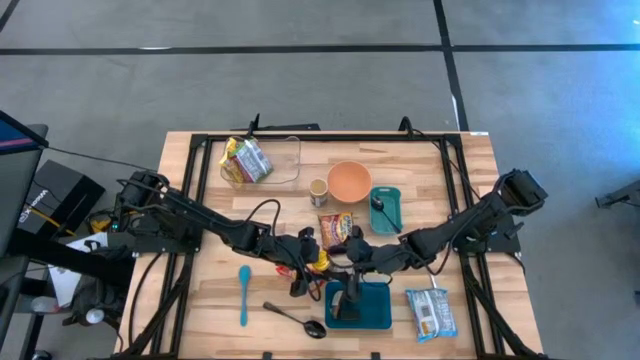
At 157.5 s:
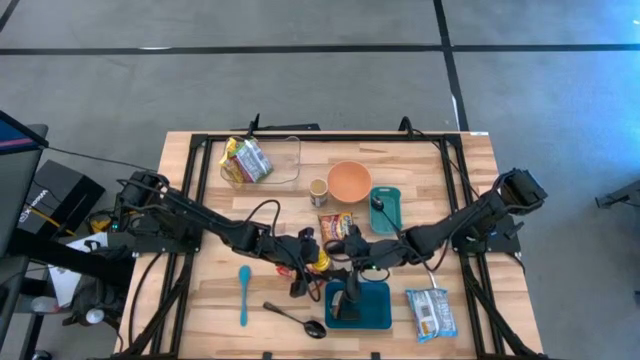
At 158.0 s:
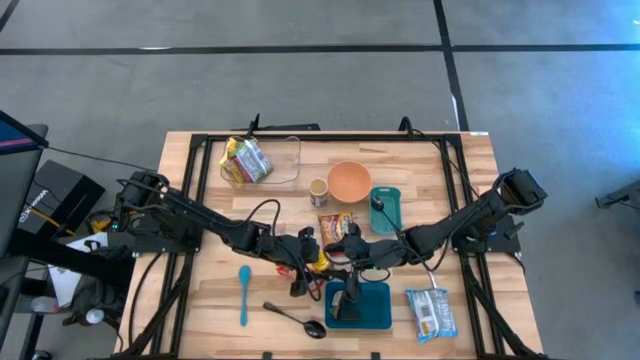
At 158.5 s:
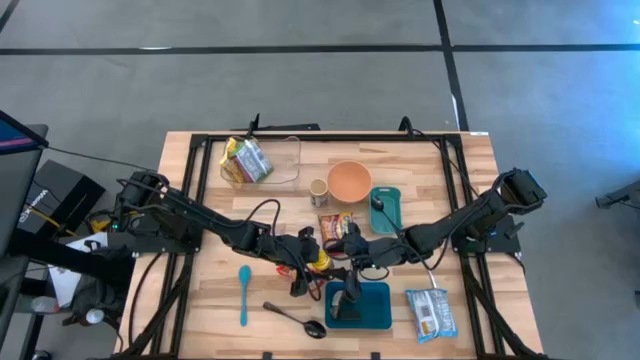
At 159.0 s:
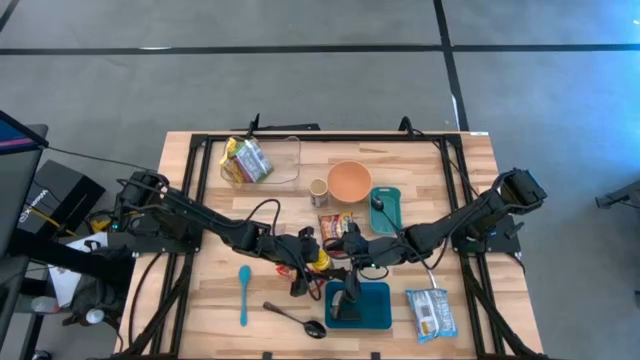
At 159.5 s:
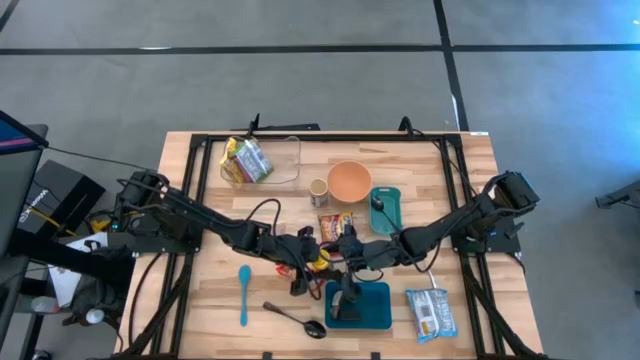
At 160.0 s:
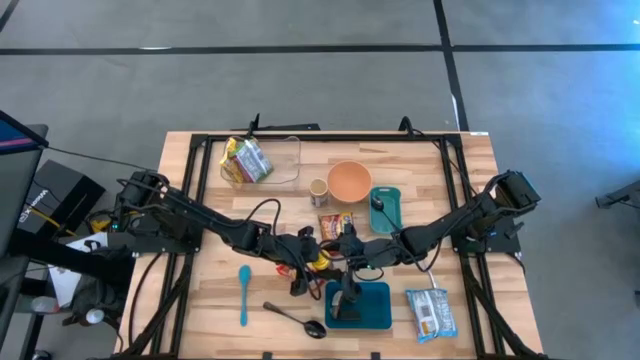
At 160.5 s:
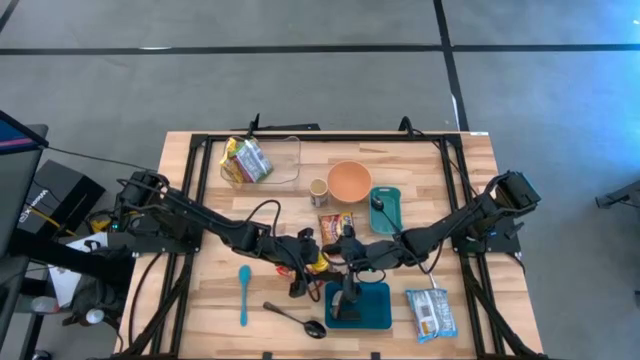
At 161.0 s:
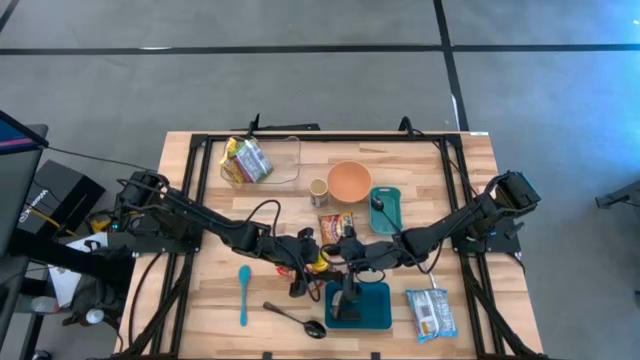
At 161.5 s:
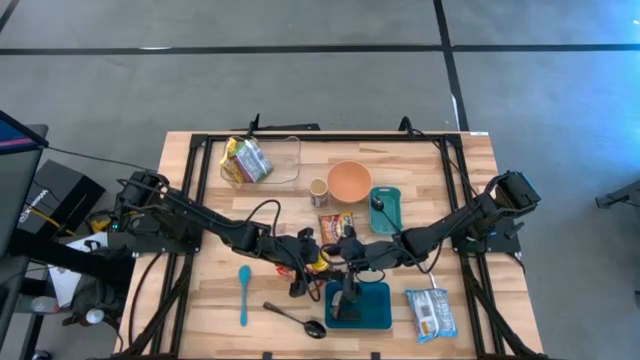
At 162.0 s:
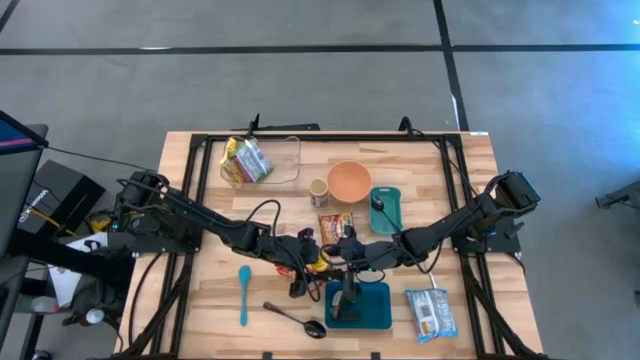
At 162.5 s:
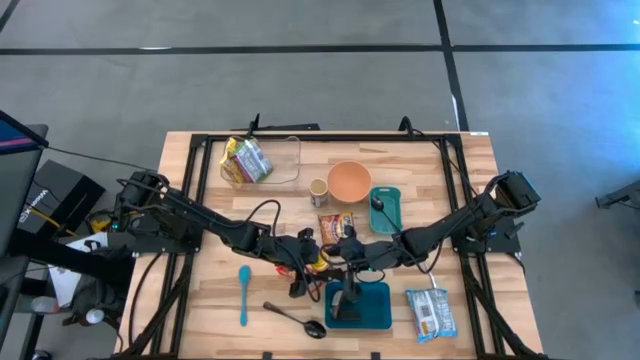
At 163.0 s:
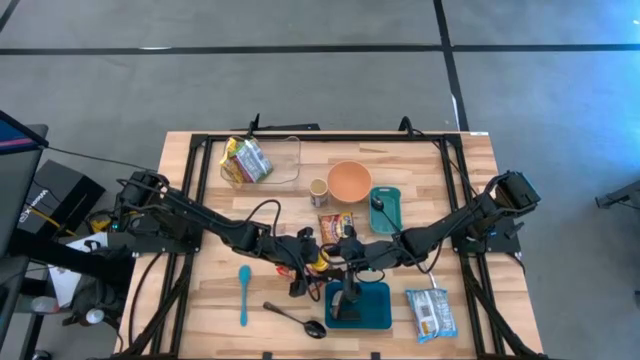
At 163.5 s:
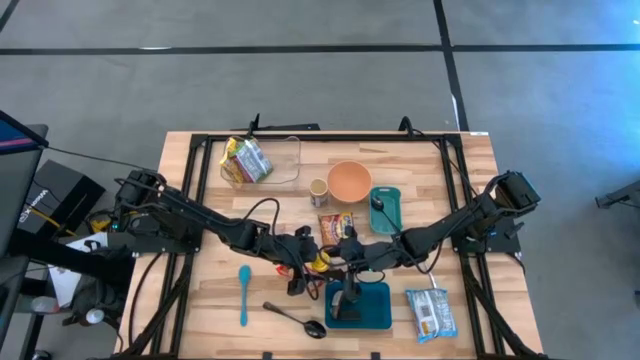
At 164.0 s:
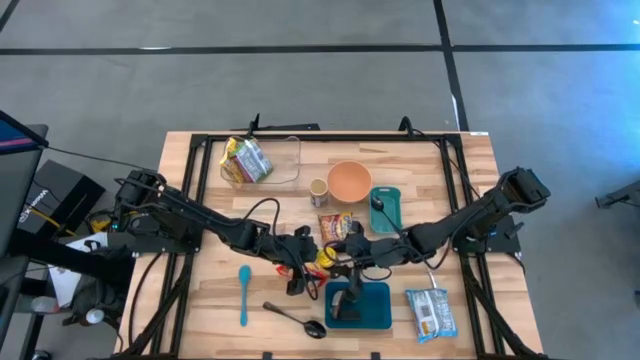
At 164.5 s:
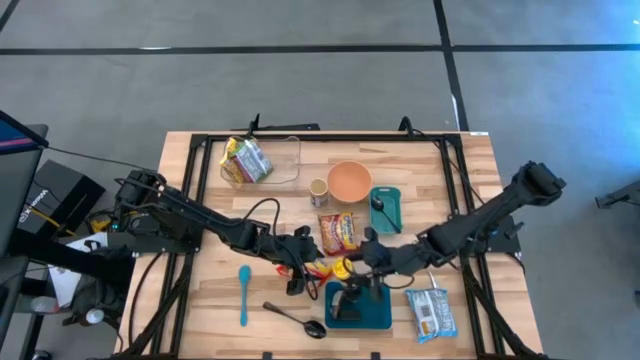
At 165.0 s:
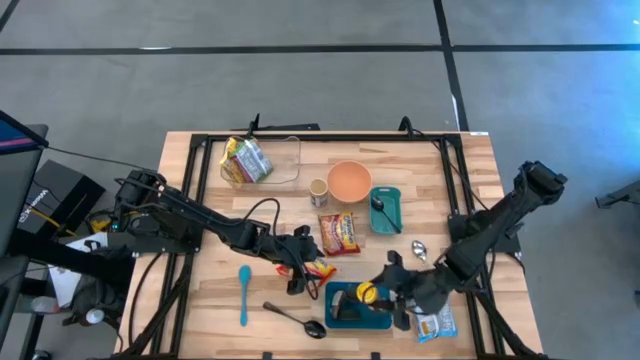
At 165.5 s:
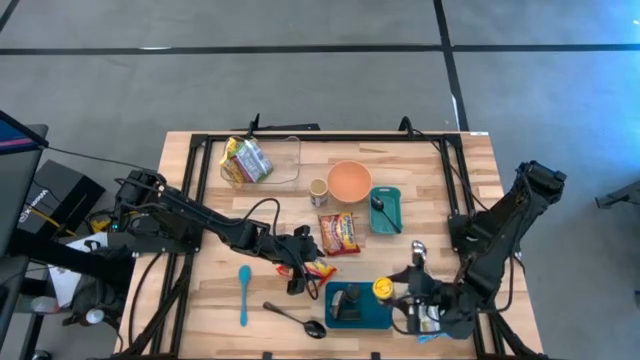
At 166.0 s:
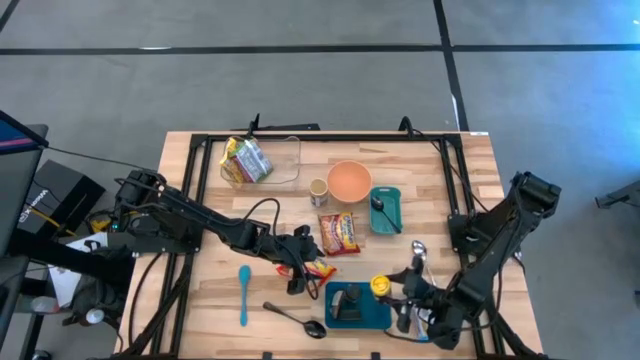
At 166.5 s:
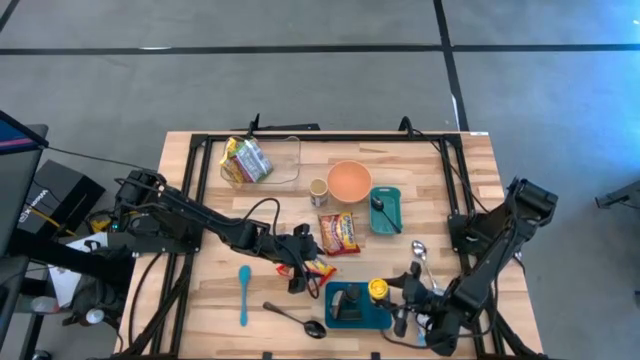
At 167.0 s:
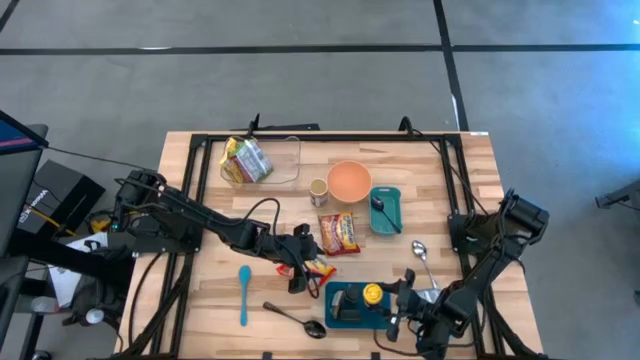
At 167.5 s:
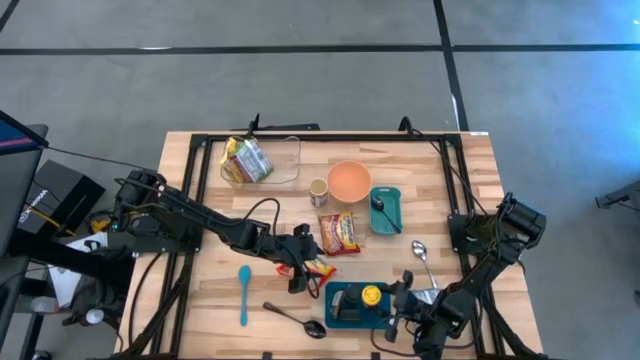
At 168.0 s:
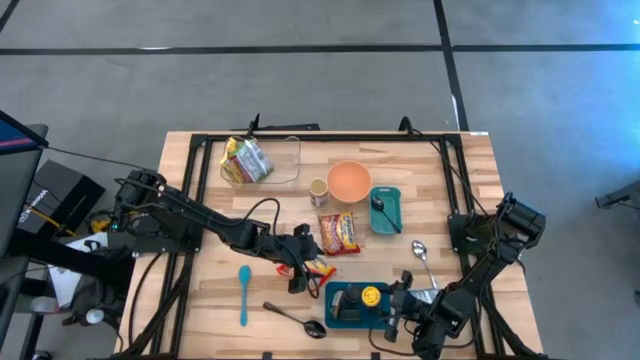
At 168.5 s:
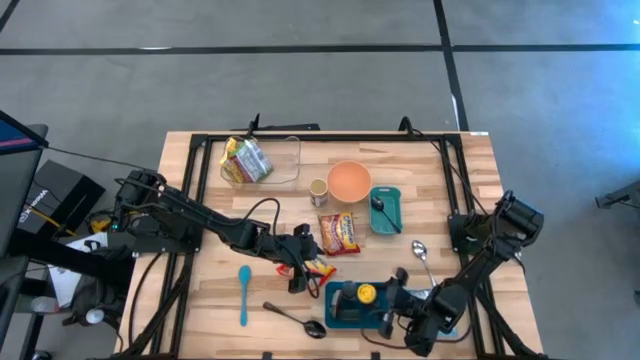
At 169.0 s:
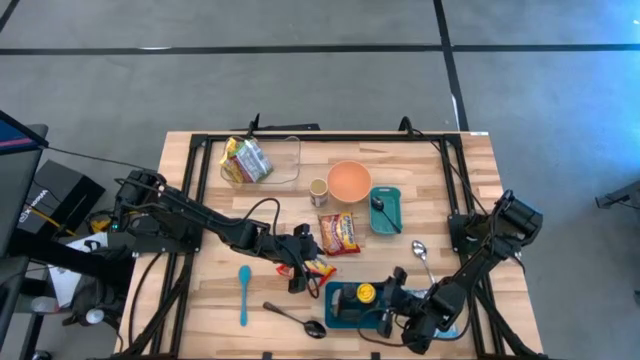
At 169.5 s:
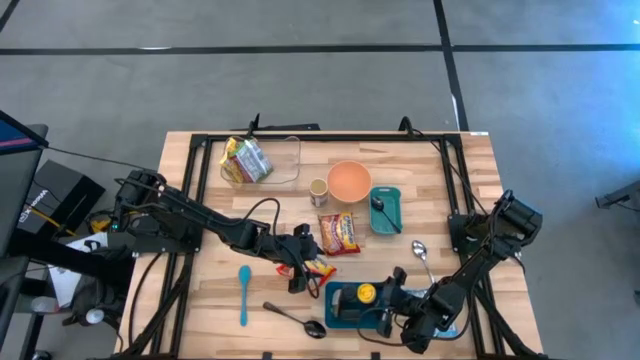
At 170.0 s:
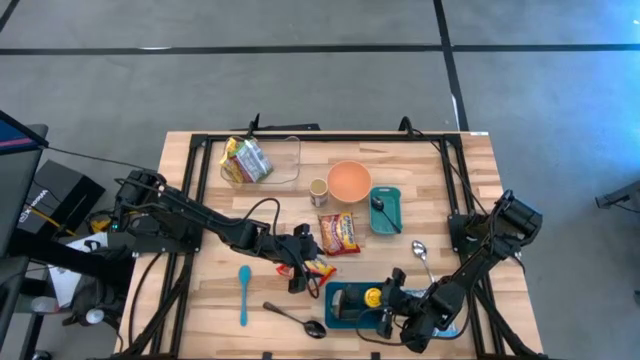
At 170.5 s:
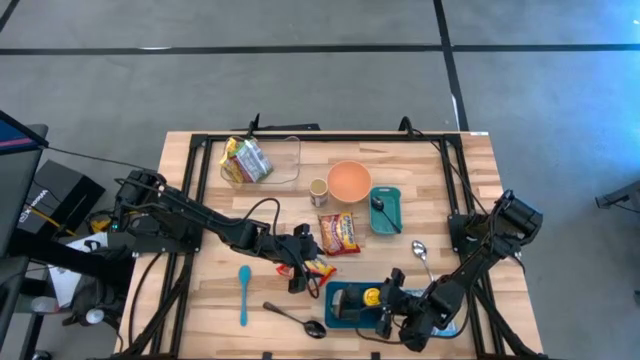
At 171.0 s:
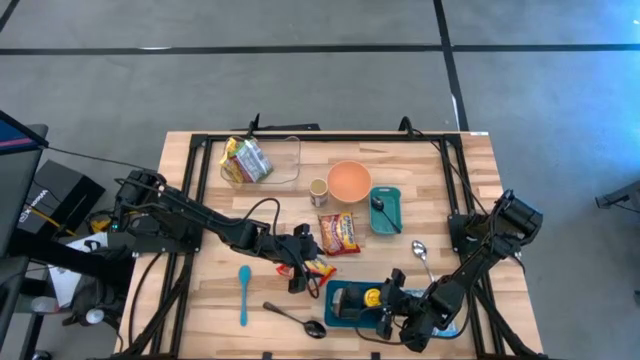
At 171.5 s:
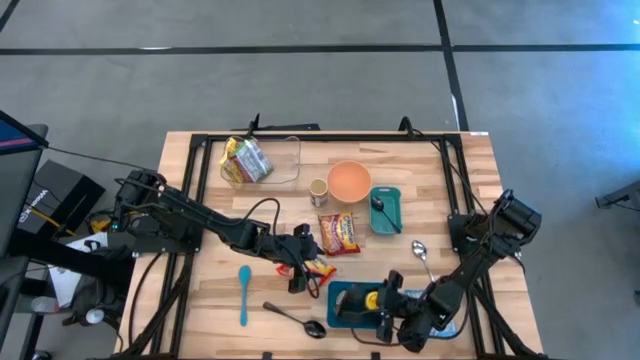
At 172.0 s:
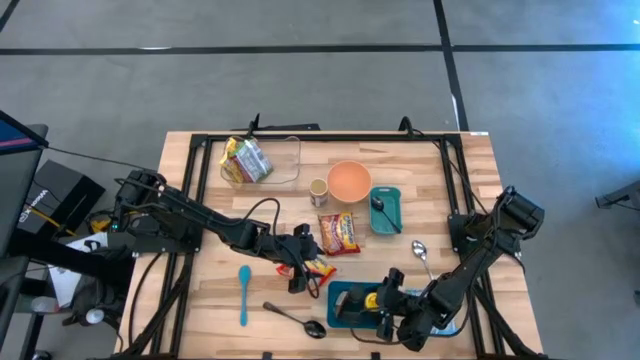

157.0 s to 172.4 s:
Task: Pick & Place Food Item
Put the yellow seasoning bottle into the blue bin

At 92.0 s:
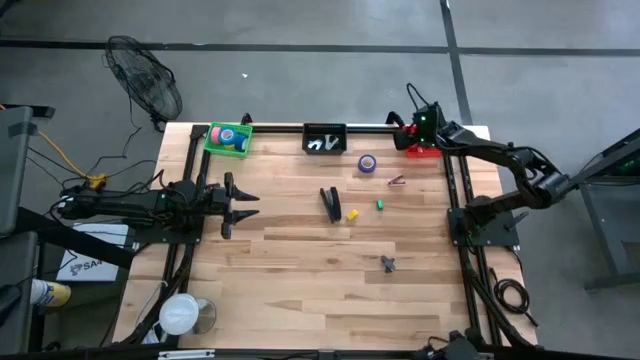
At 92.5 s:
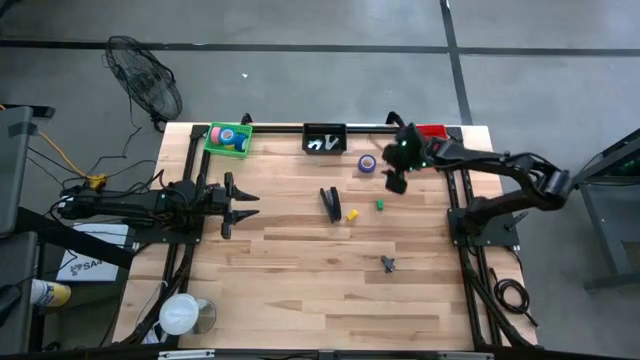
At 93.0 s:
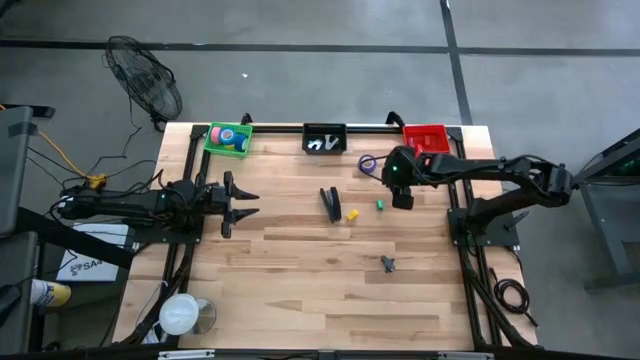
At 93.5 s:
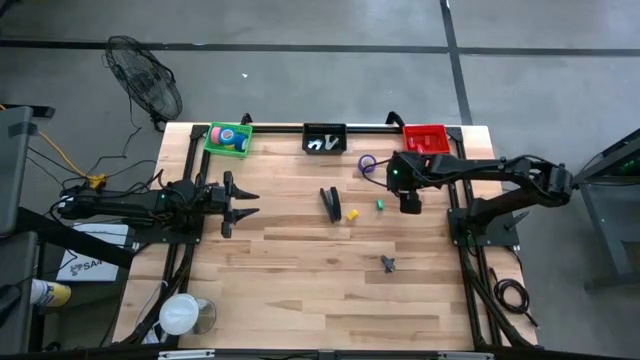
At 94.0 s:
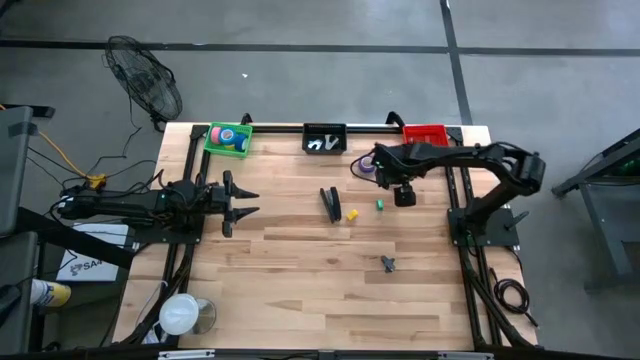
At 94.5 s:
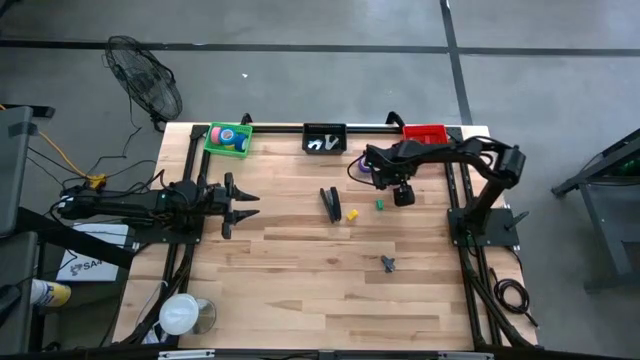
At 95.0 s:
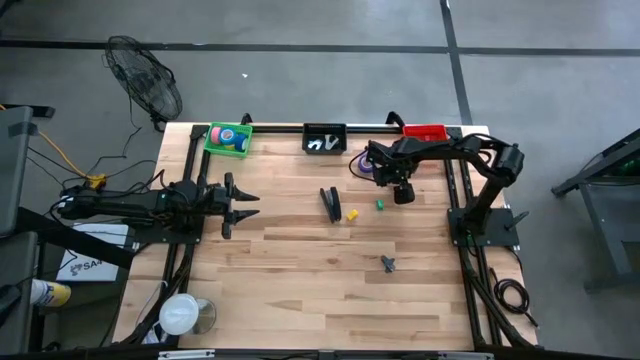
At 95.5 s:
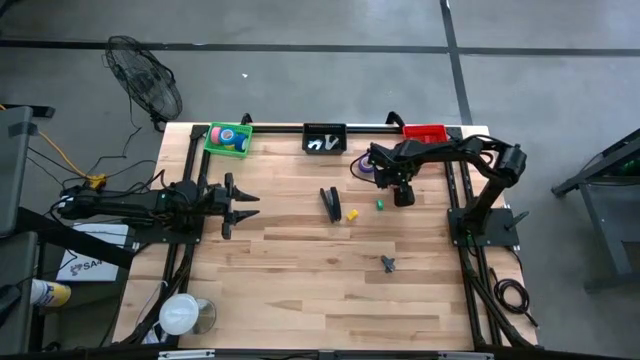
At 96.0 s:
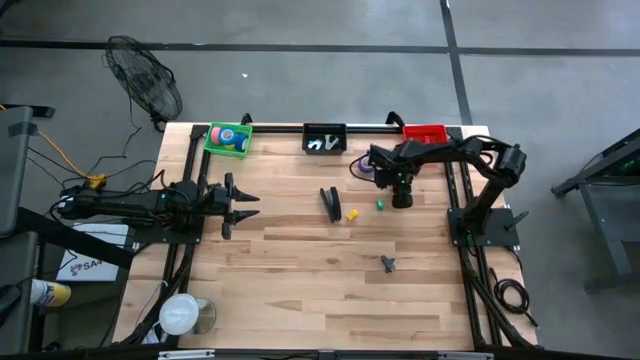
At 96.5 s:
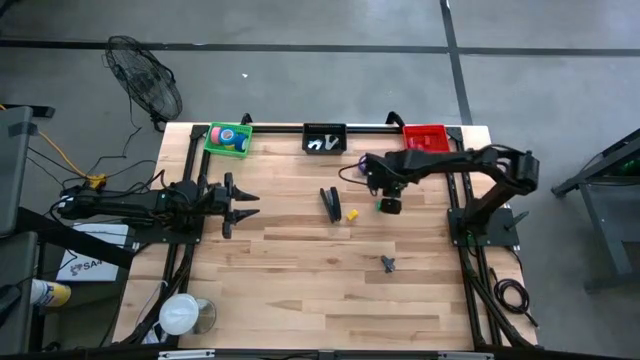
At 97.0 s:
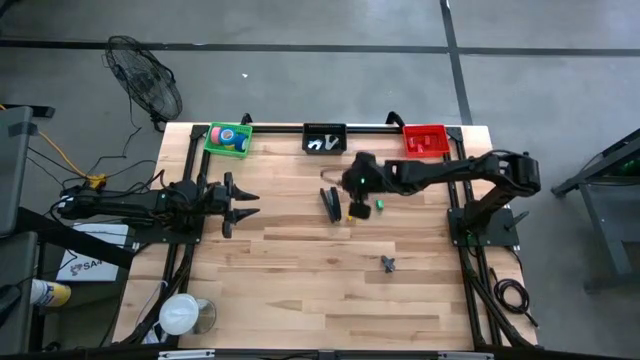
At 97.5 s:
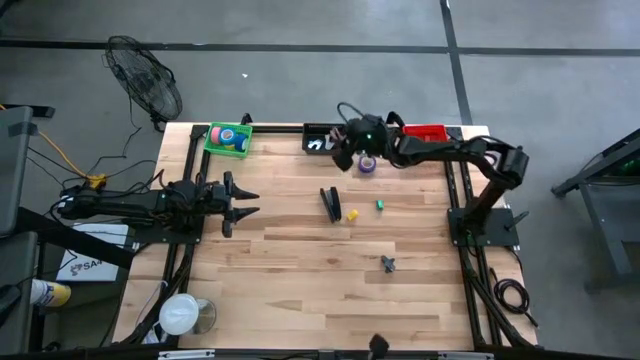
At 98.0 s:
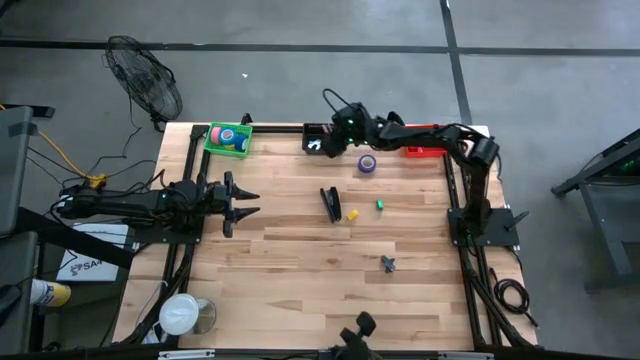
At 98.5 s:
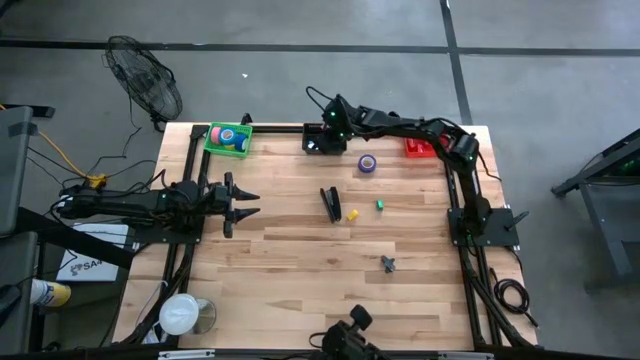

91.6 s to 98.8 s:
Task: Pick and place Stapler, Stapler remover, tape
Put the pink staple remover in the black bin
